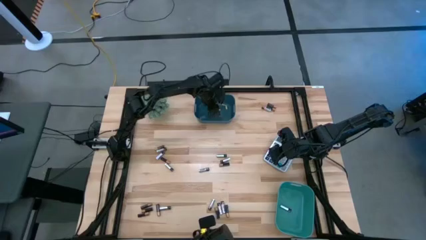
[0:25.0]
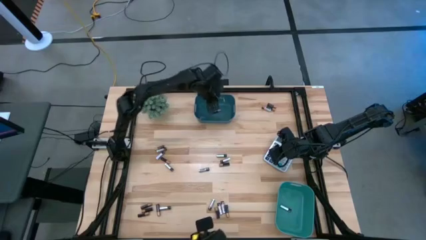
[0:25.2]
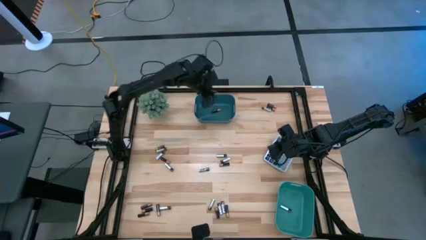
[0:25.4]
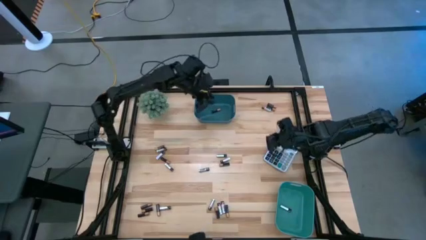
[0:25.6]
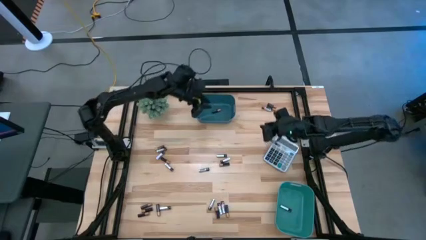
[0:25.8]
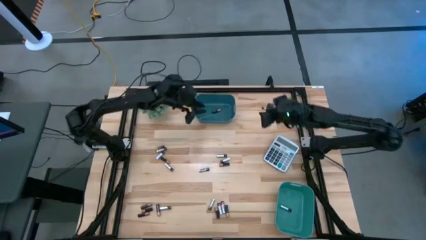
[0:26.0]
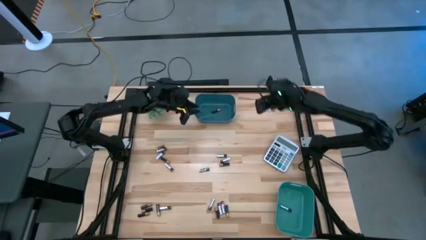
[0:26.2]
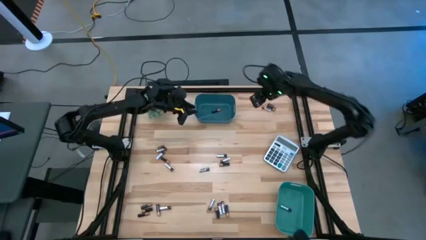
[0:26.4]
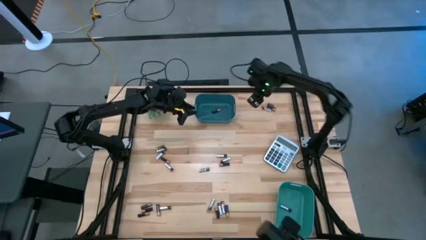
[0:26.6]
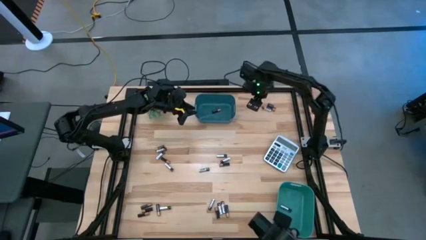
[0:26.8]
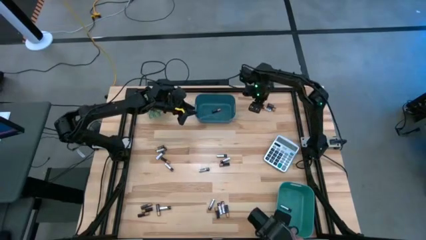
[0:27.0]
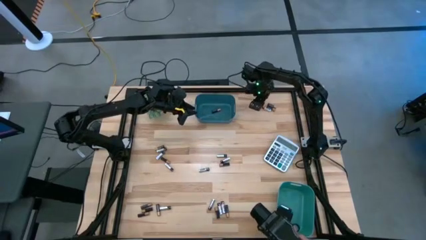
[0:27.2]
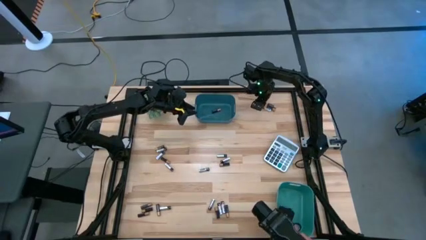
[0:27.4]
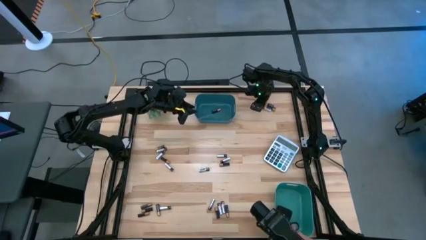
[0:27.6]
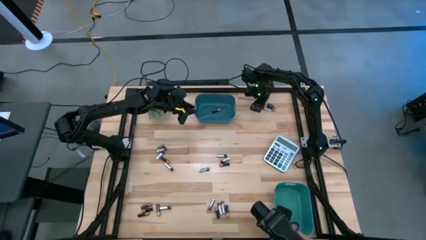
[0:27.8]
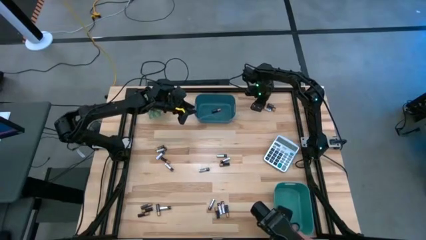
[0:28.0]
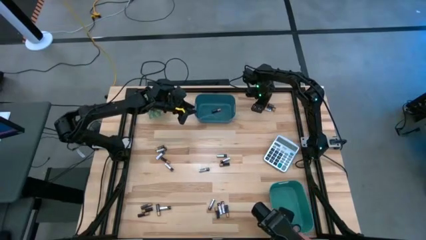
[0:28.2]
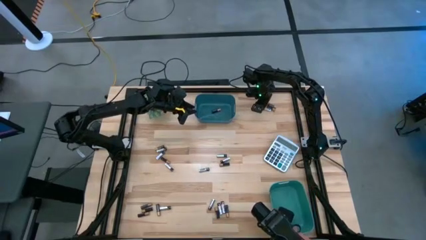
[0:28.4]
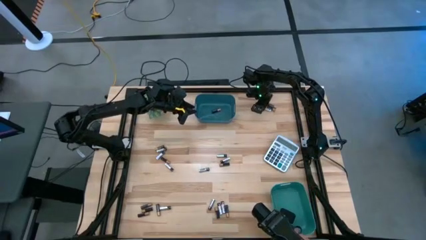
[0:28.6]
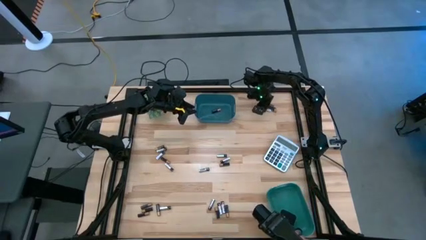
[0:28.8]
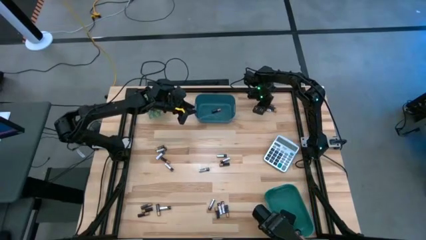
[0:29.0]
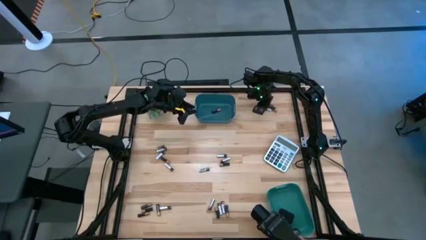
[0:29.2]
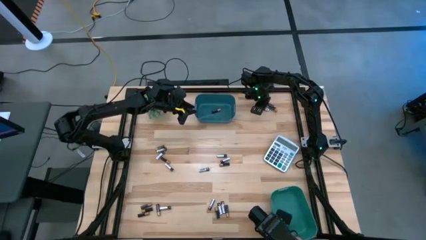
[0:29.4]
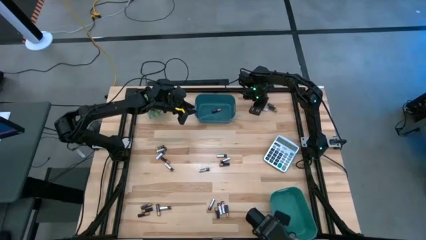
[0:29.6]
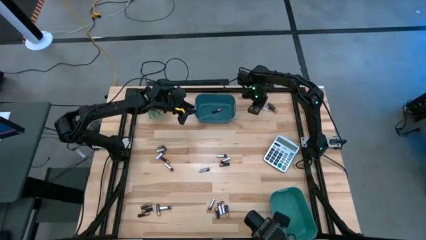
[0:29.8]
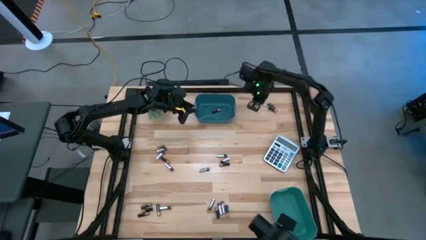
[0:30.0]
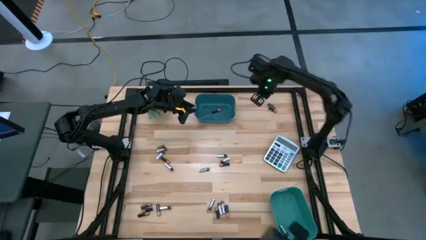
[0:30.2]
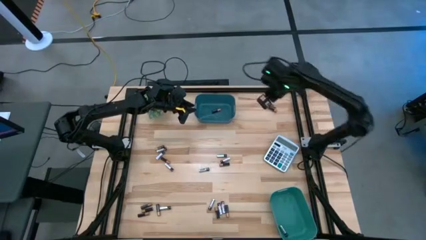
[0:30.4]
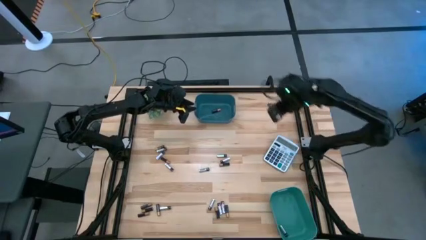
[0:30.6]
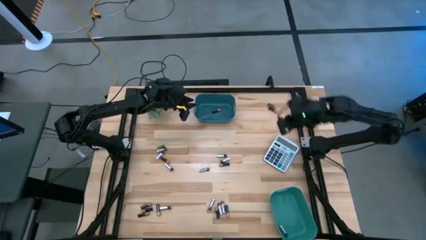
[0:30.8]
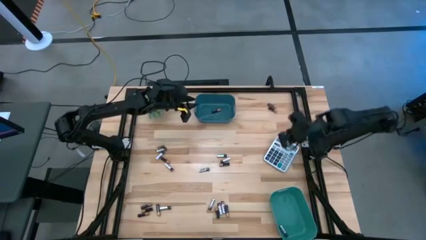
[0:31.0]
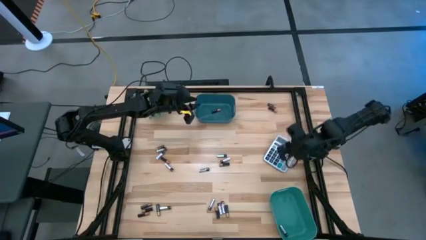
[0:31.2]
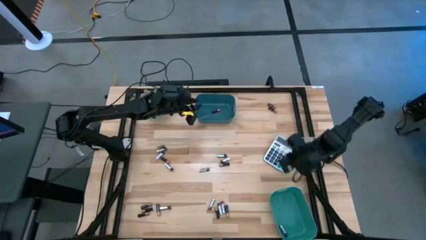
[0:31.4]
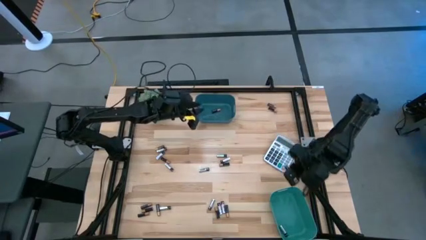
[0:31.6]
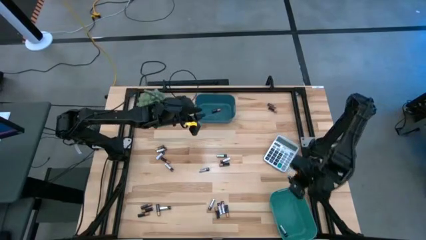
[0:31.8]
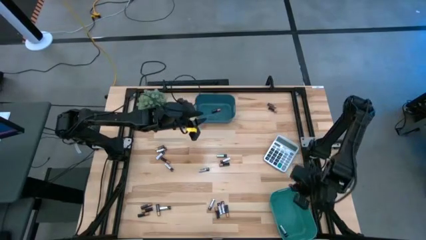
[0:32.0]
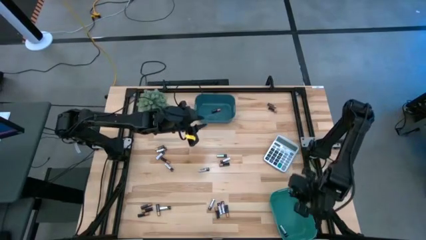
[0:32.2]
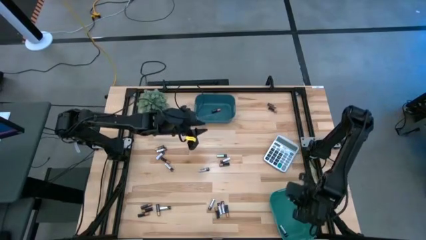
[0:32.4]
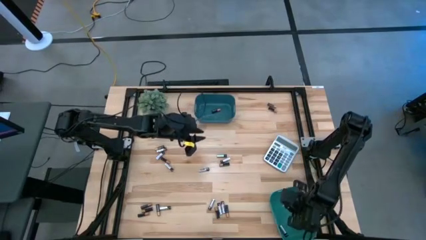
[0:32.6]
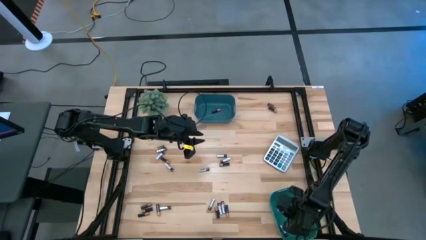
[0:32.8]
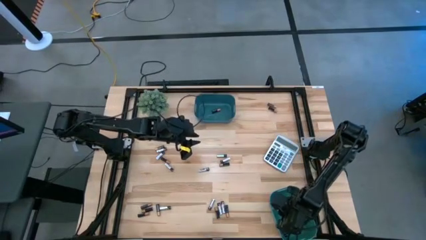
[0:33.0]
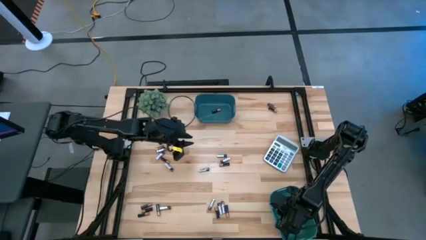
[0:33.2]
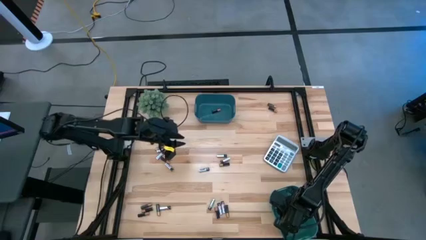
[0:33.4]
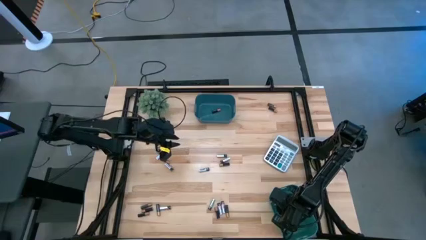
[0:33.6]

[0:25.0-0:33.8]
Task: Sort batteries
Put the silver battery into the green bin

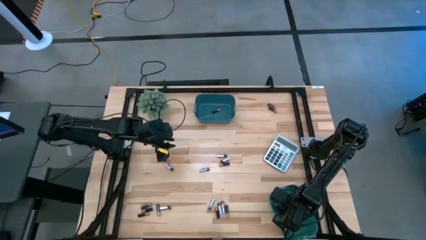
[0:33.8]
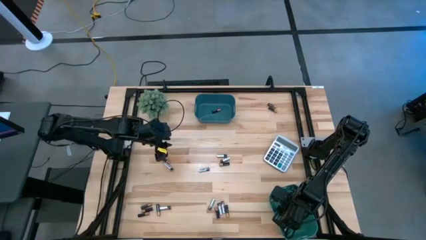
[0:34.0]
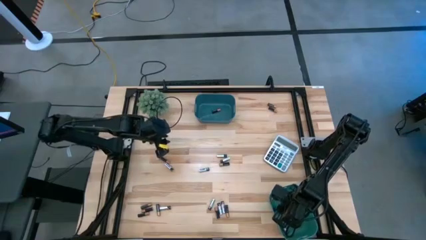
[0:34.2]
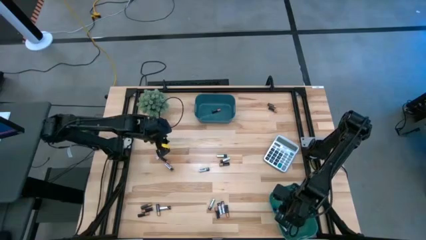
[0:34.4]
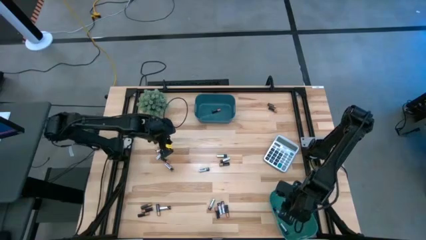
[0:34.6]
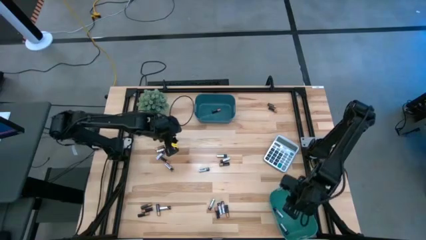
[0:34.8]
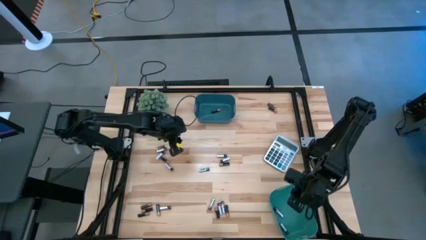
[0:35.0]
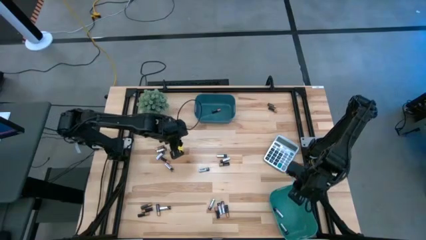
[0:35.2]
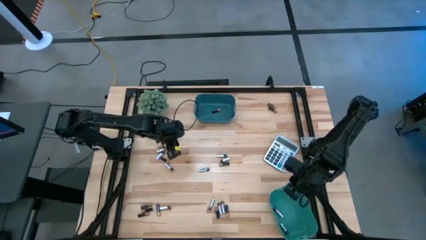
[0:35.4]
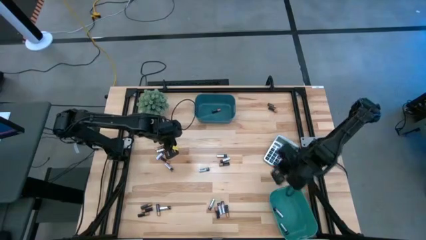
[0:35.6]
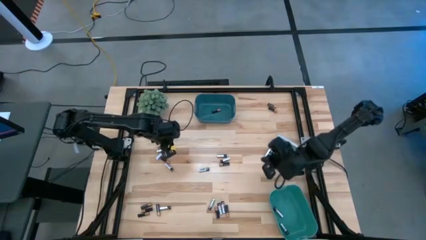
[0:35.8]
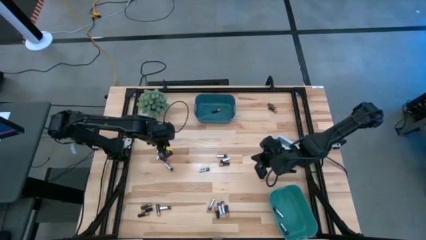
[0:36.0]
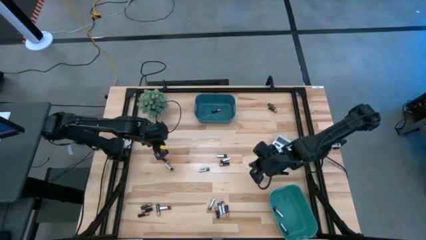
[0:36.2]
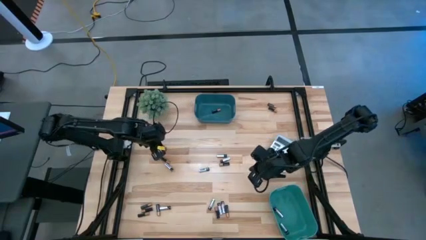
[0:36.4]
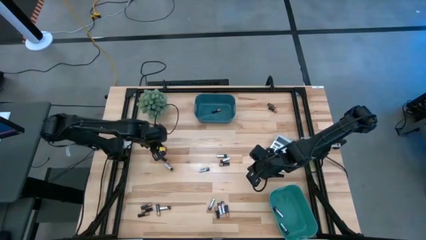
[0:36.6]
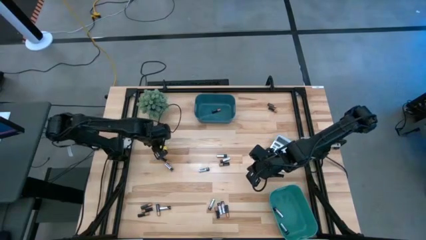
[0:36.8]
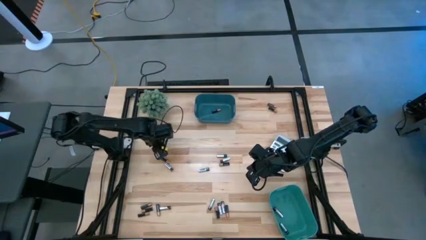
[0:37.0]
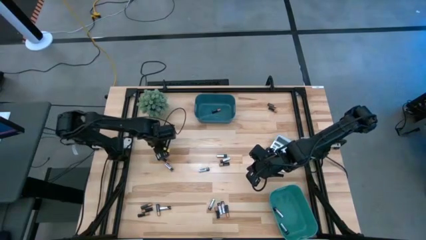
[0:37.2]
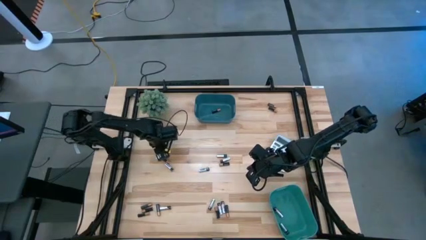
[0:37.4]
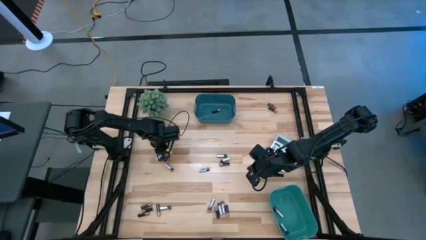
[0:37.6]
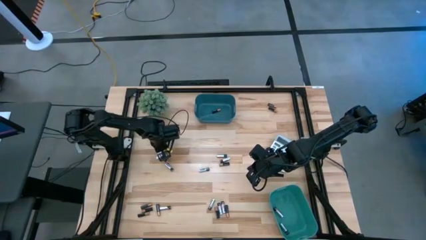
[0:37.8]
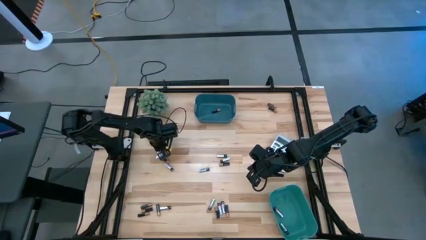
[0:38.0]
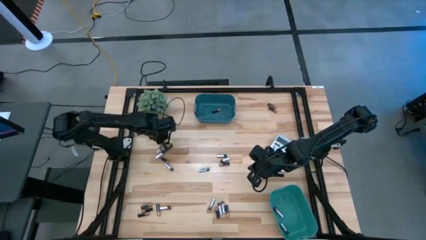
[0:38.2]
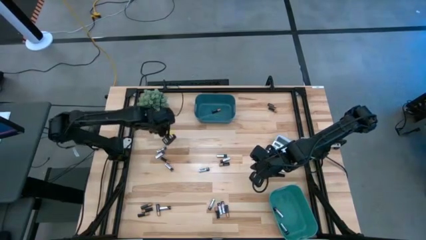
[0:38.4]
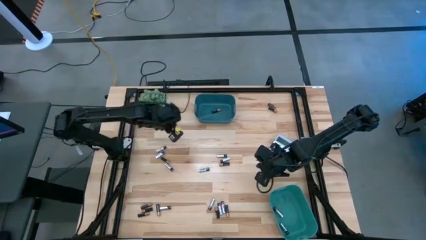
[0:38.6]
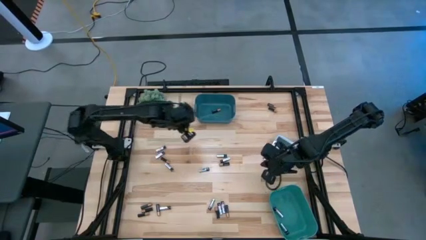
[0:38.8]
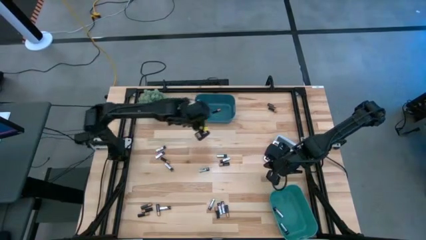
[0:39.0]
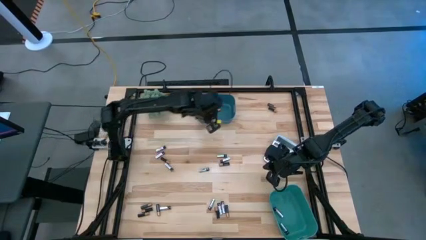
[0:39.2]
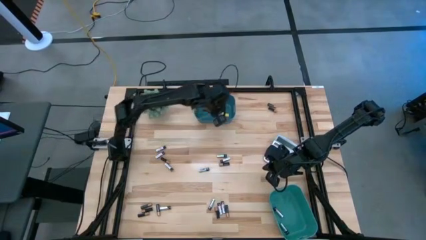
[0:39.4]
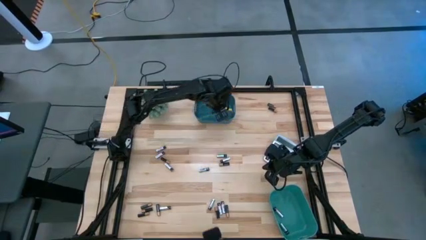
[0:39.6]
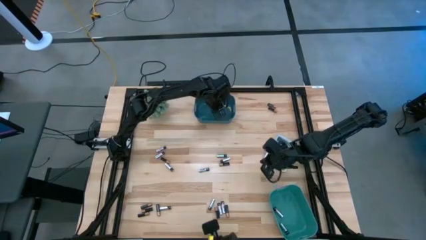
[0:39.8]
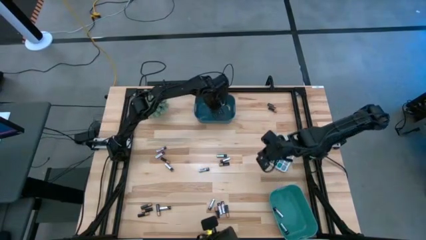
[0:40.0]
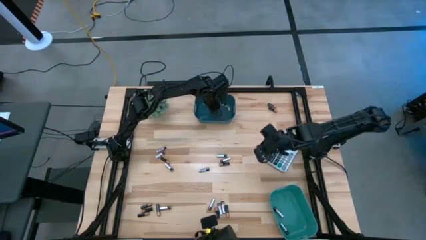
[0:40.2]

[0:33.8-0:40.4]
Put the black battery into the blue bin

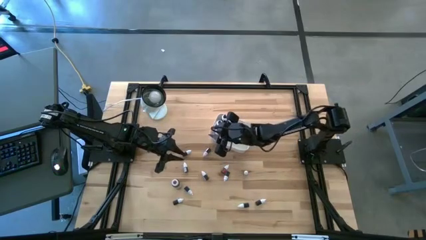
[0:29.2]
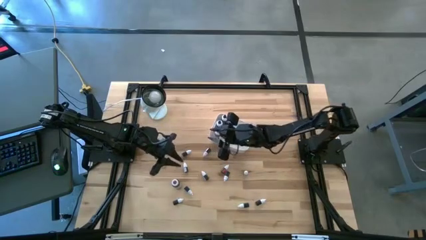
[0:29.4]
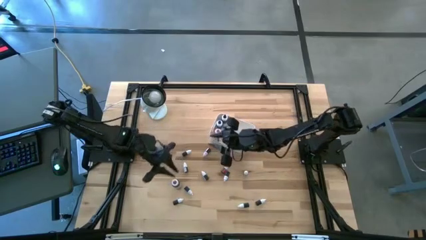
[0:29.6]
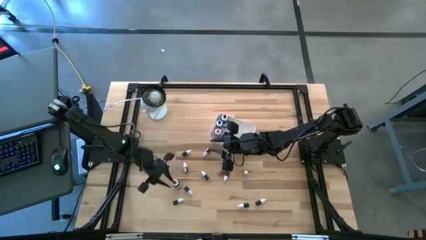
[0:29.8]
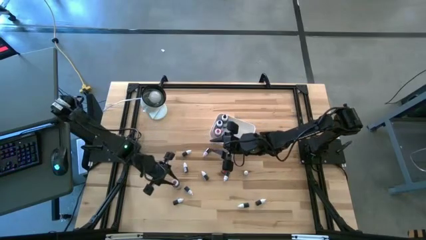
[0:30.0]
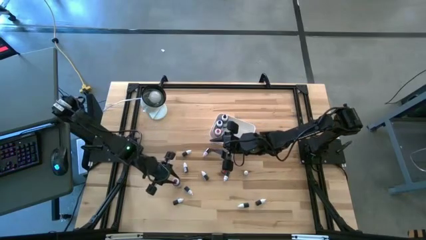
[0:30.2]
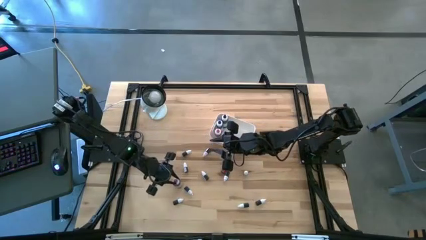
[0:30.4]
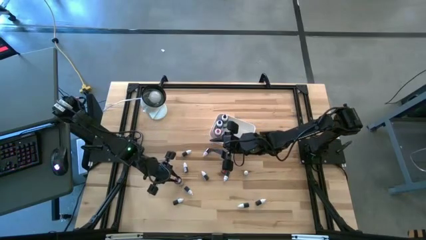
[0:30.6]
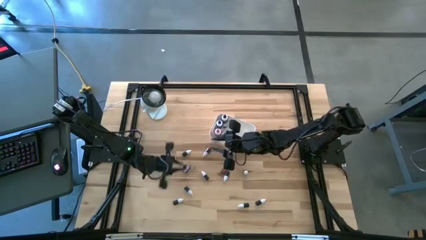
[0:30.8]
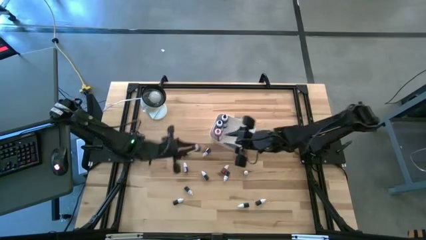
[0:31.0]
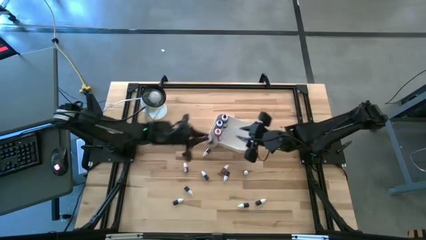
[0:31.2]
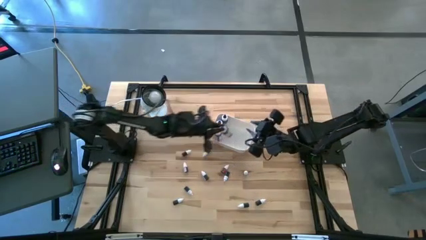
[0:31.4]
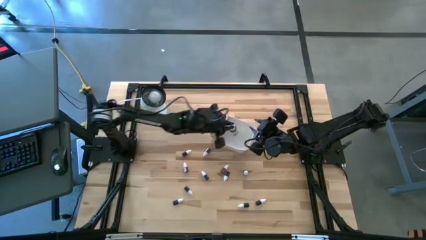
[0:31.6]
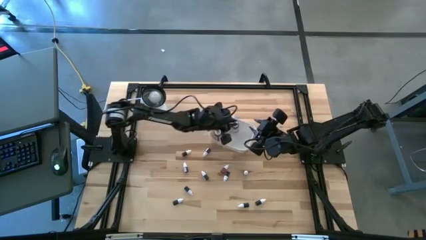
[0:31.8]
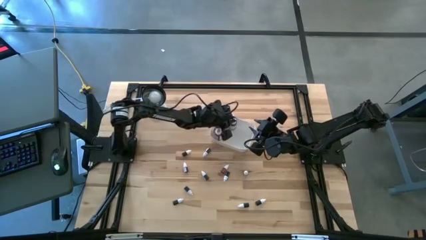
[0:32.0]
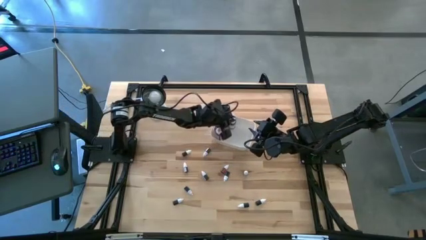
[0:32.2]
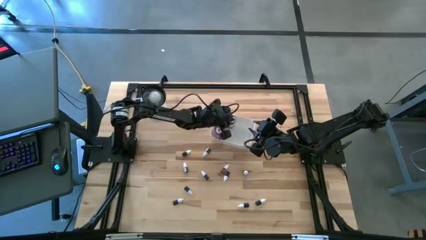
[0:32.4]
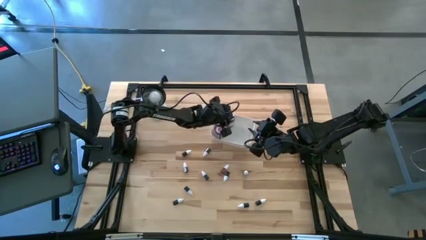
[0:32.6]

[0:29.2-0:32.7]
Task: Pick & Place food coloring
Put the big violet food coloring bottle into the white bin
